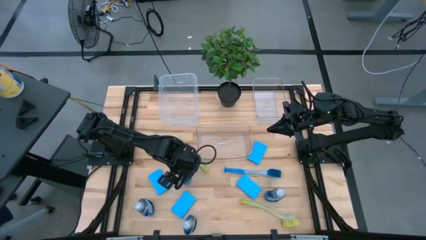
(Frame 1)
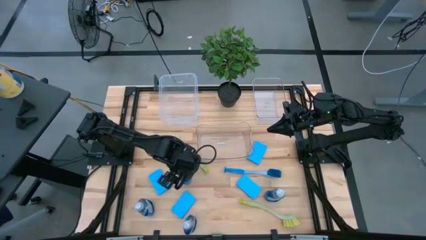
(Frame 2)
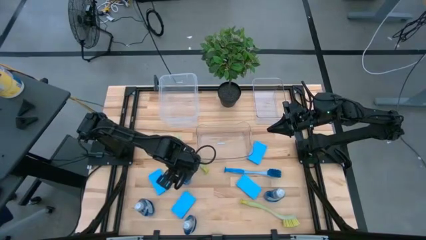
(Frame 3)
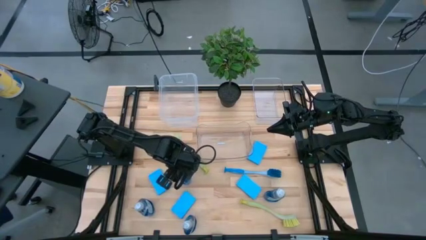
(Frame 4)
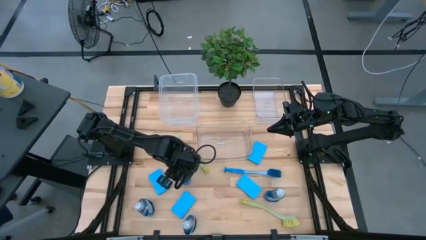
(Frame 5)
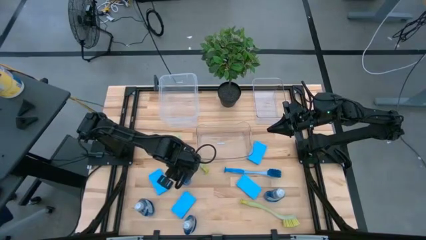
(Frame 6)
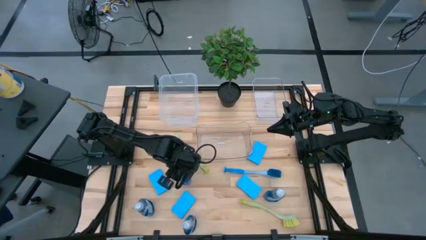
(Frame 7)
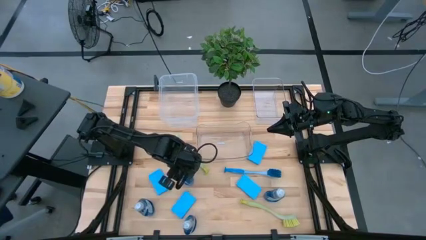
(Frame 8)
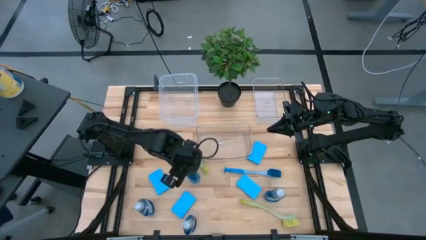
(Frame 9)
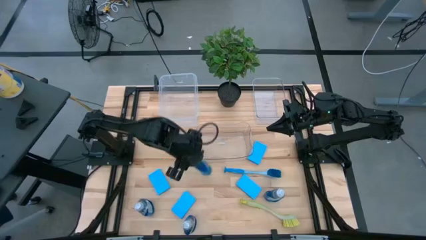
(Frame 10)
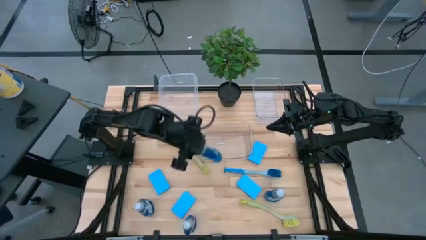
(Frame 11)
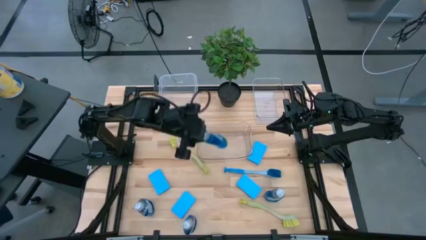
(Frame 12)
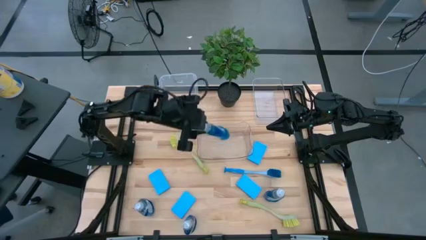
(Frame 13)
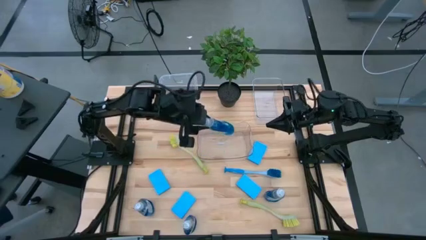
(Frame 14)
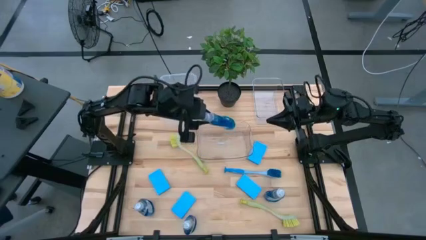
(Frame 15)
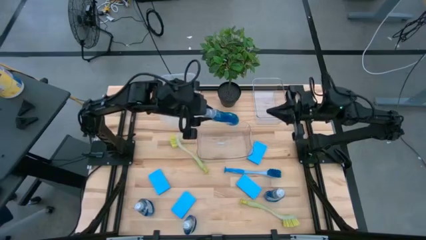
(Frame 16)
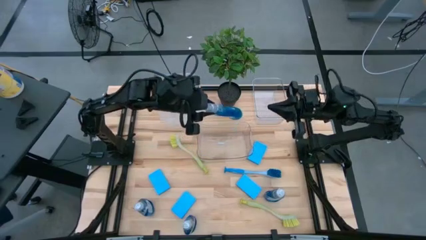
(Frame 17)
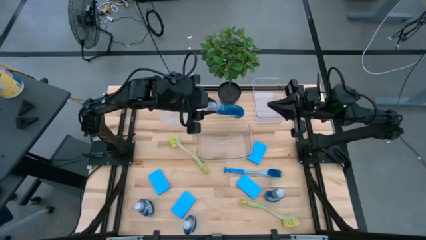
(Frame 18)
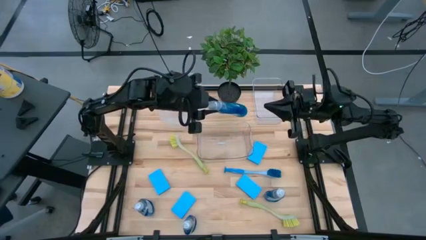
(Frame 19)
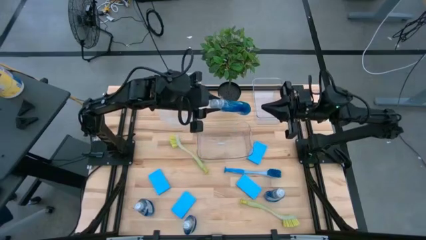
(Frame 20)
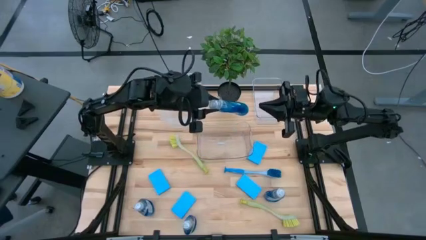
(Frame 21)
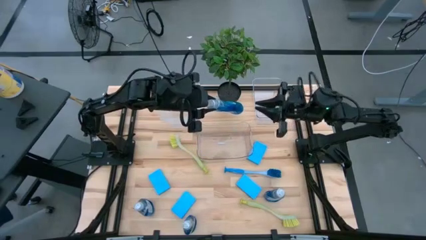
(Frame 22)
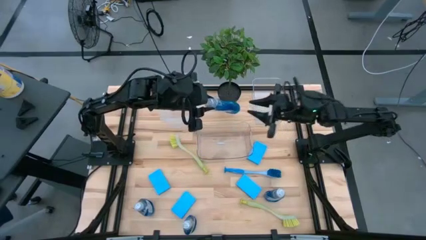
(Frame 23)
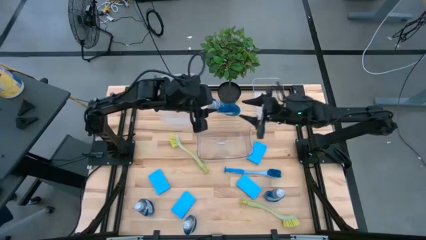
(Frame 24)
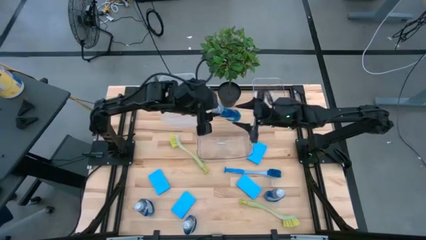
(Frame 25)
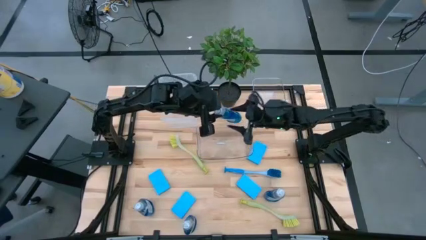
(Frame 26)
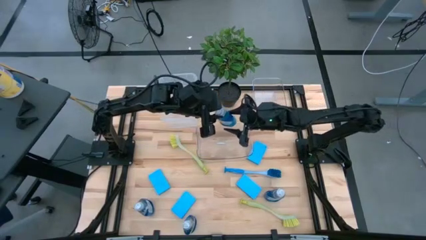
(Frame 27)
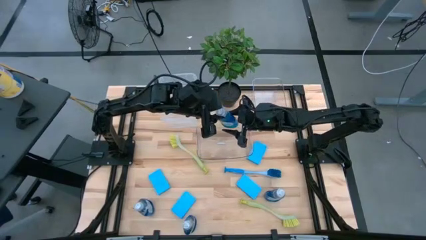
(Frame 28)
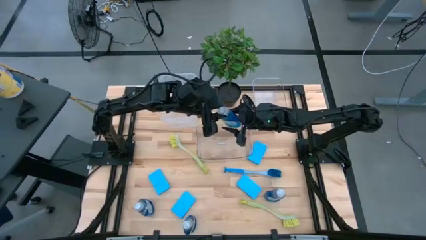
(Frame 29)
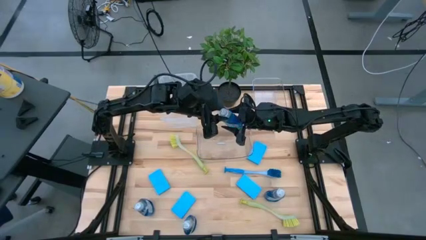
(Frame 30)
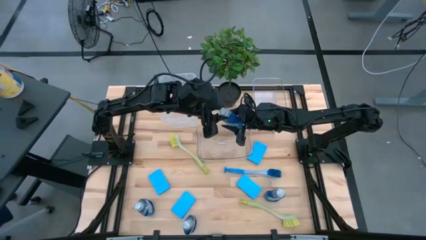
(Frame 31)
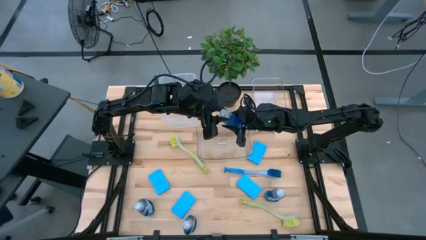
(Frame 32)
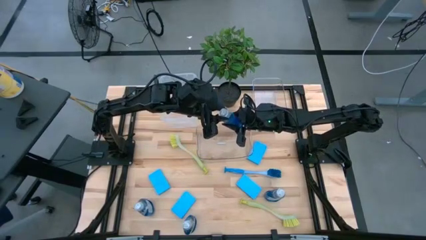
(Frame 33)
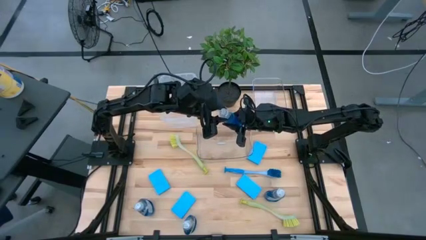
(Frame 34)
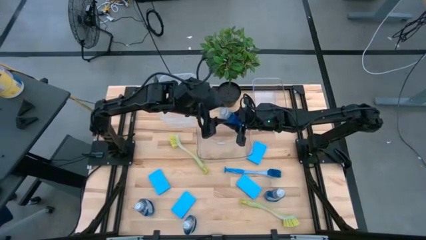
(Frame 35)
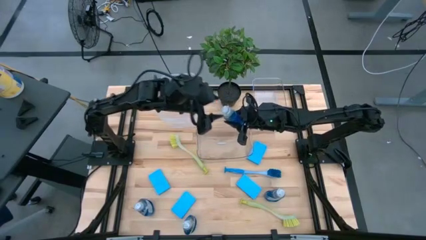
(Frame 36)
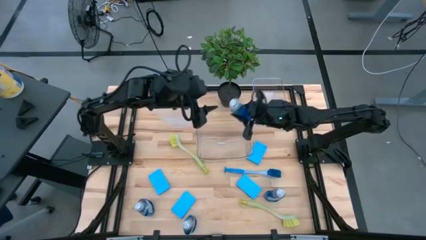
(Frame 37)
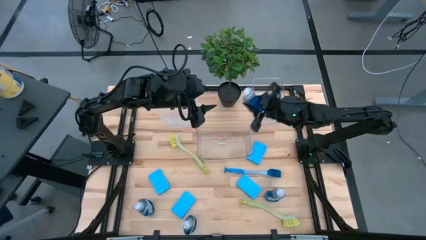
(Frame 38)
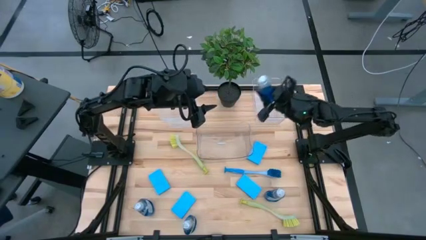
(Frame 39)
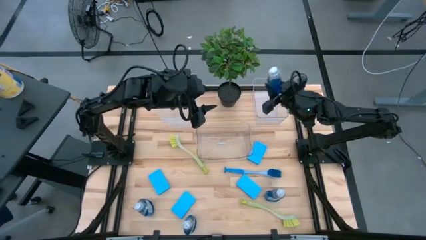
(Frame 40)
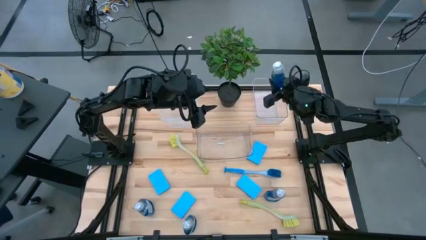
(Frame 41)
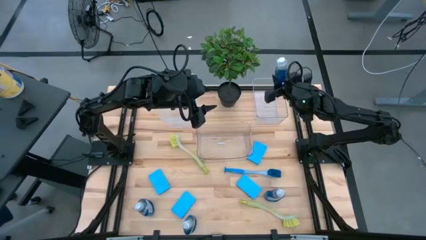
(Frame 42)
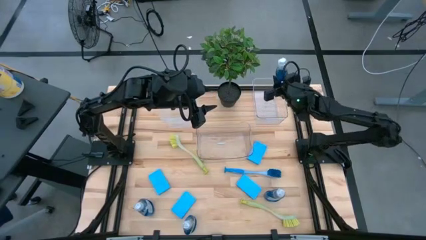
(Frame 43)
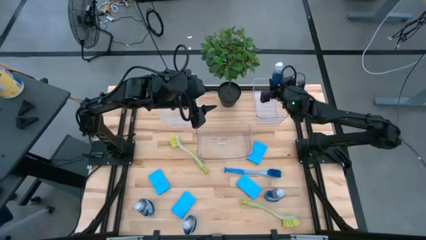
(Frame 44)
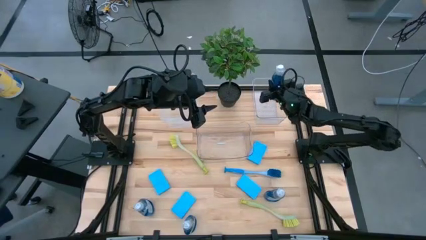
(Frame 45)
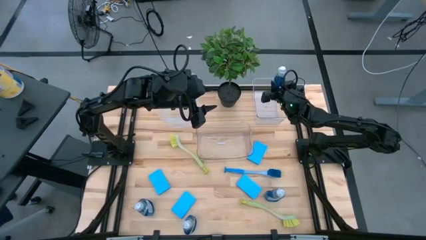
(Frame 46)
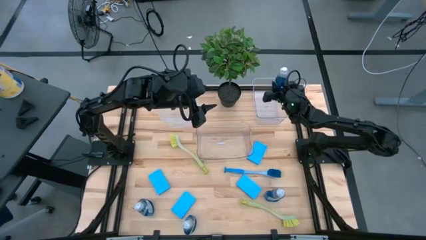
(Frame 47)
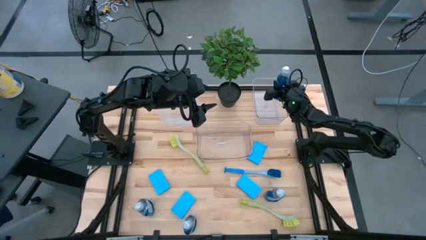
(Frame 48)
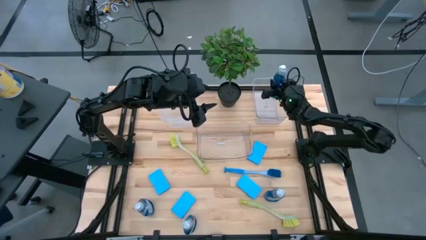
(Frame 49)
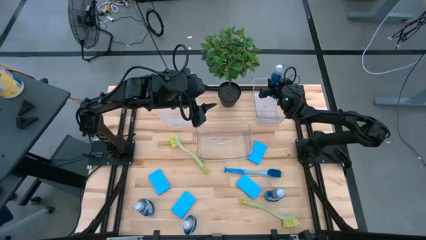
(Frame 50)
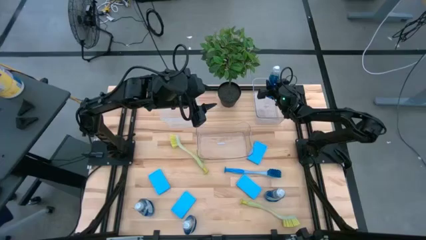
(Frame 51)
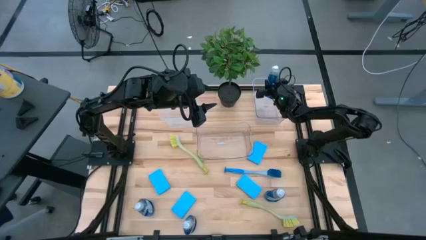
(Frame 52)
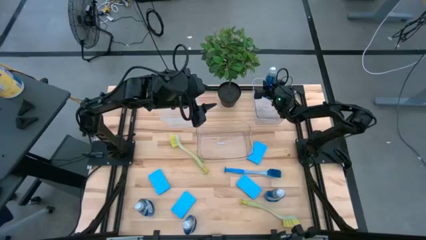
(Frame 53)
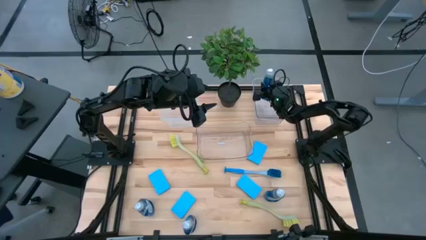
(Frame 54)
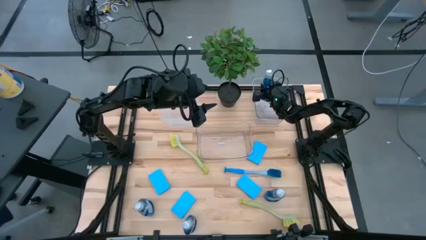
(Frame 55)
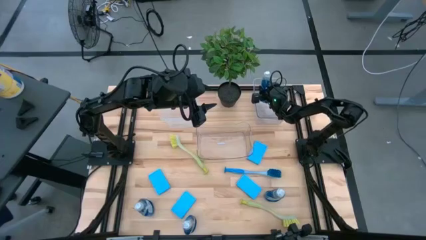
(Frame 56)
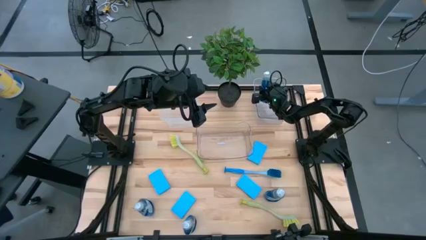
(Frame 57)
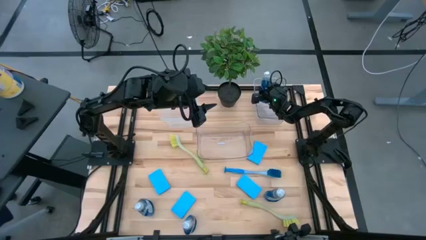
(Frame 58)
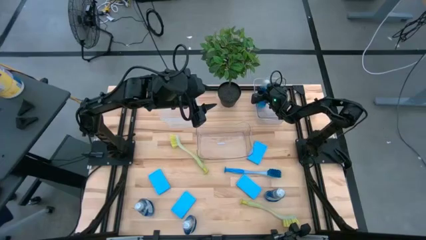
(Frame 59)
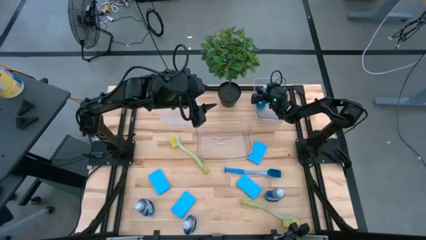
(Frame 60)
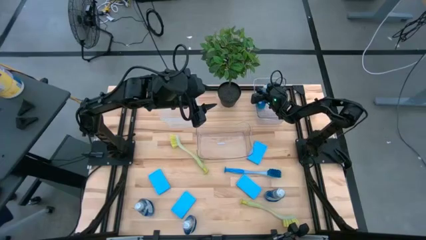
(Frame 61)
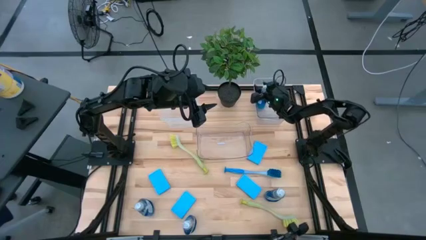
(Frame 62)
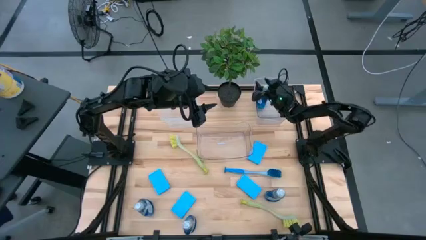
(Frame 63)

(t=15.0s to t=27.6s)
Task: Pick & Place Kitchen Sink Supplies
Put the dish soap into the top transparent bin

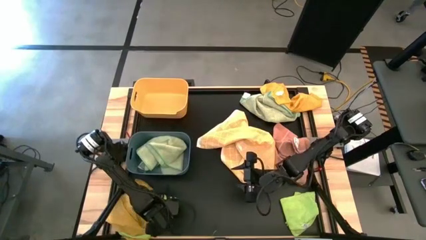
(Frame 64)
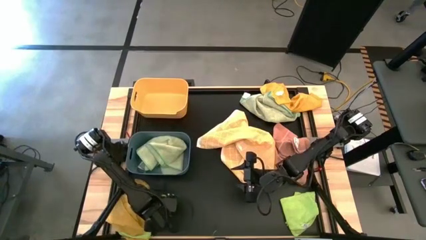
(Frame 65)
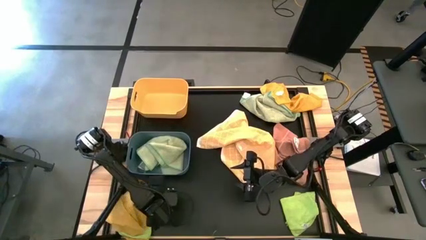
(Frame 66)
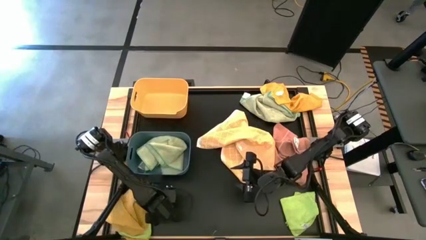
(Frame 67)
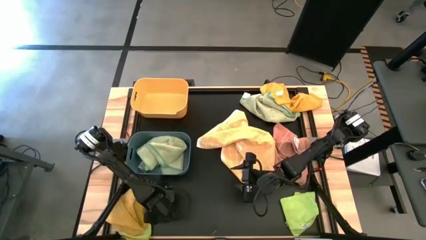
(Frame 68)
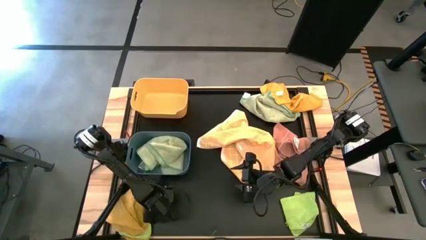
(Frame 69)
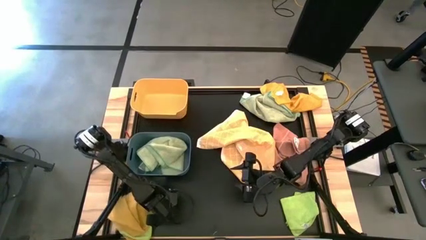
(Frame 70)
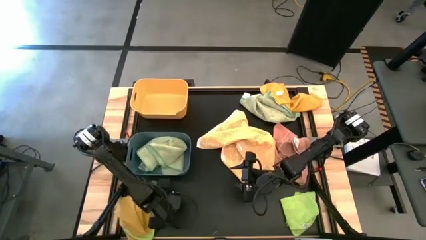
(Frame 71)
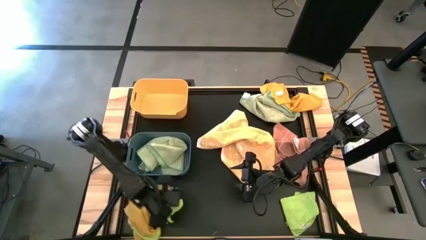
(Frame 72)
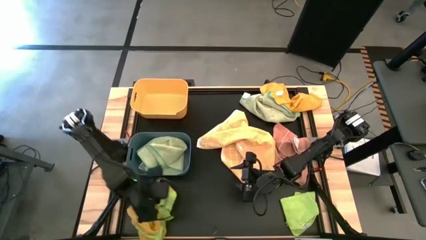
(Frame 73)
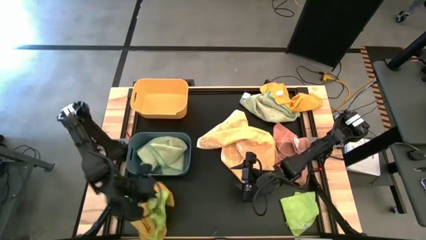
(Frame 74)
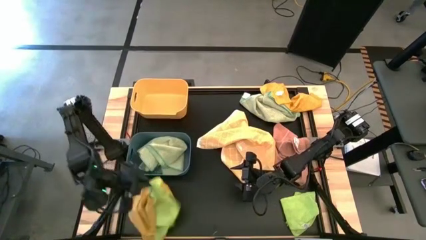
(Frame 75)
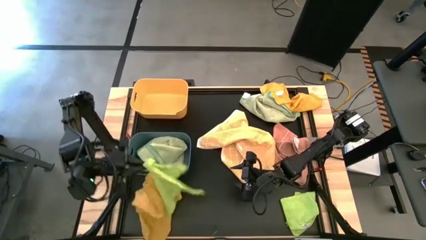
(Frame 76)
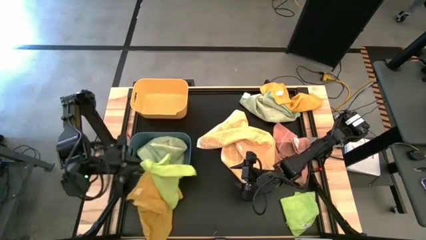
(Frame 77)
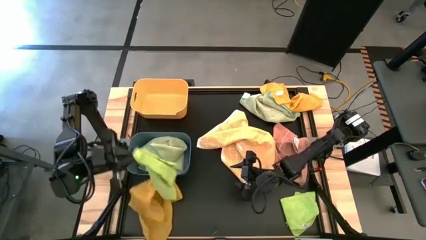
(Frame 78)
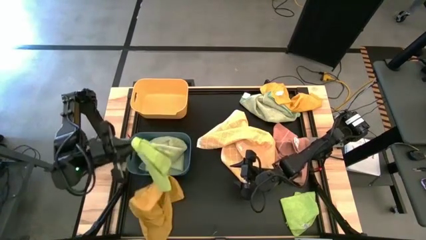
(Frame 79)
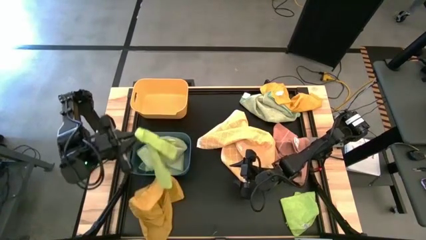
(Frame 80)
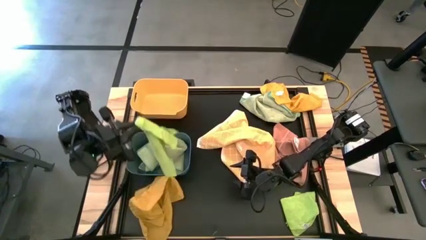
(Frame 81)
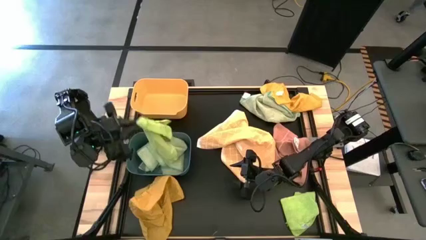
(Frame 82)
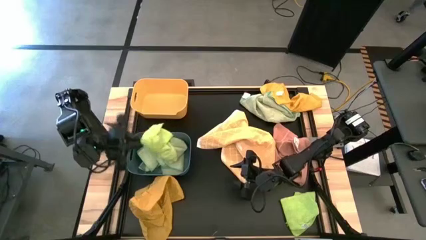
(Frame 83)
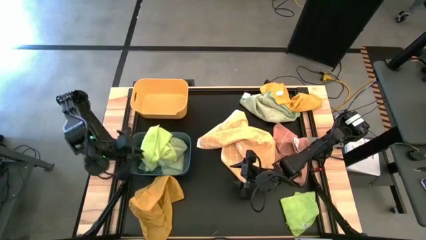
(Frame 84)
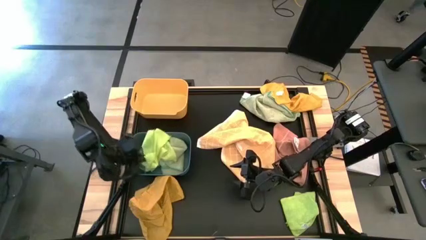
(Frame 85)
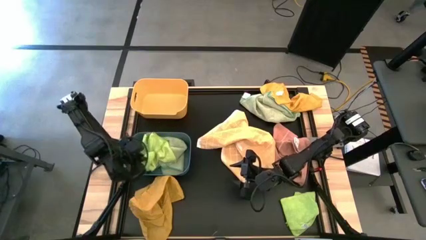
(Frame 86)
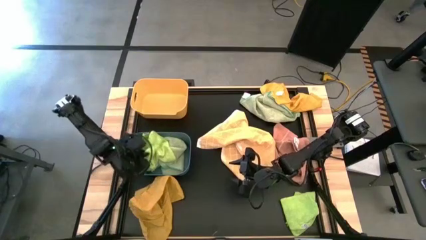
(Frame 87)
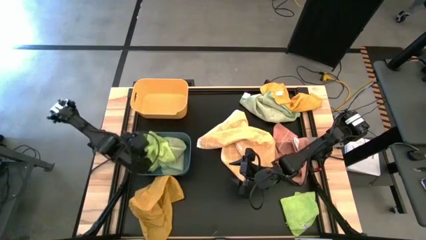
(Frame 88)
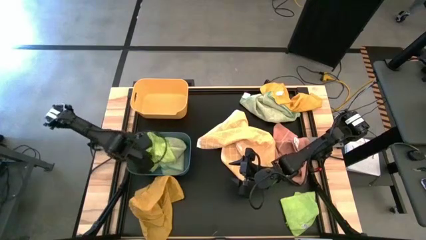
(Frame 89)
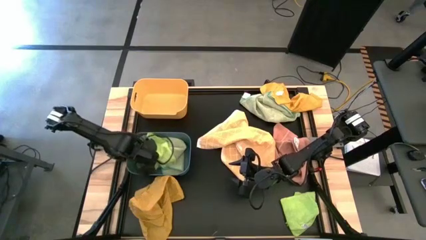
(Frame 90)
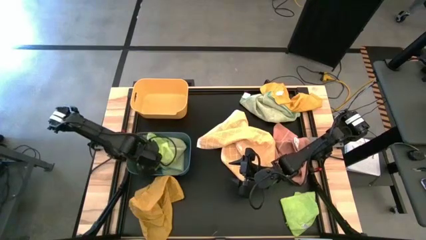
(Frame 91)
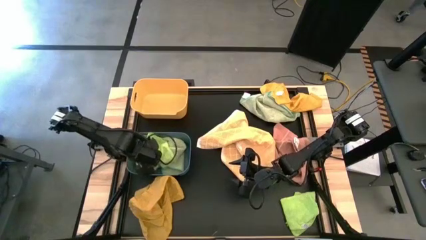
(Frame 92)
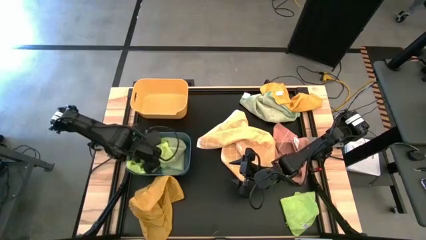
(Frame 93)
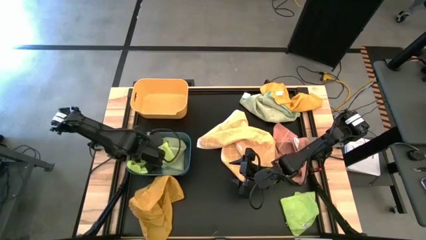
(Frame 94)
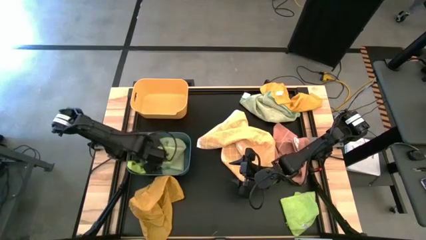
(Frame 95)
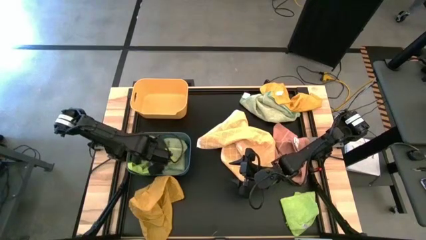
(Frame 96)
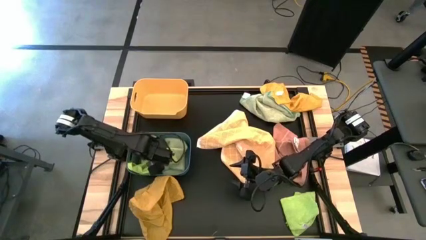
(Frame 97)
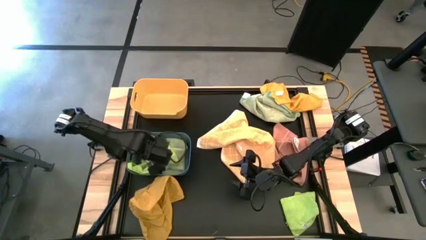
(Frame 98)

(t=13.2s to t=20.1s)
Task: Sort microfiber towel by color & place in baskets
Put the left green microfiber towel into the blue bin
